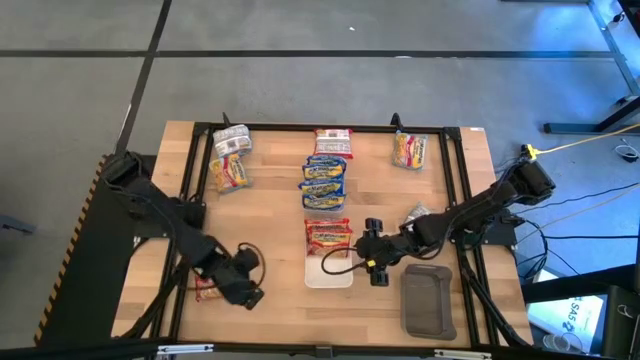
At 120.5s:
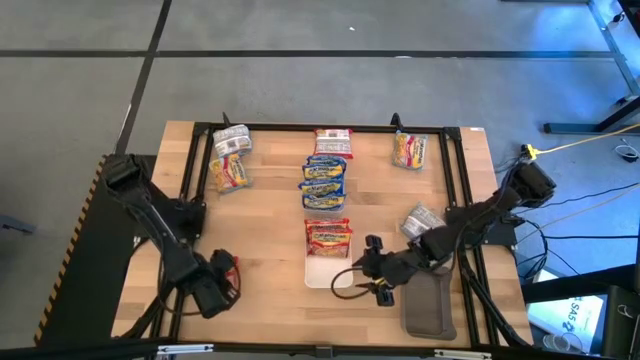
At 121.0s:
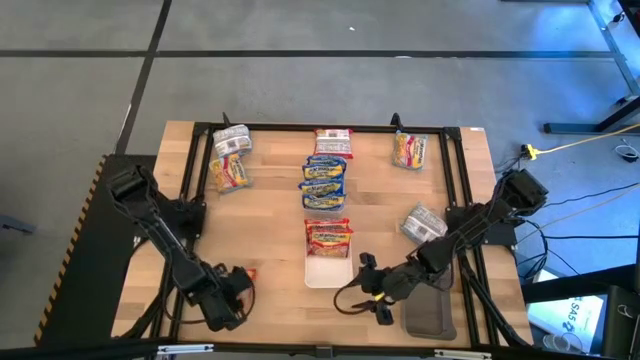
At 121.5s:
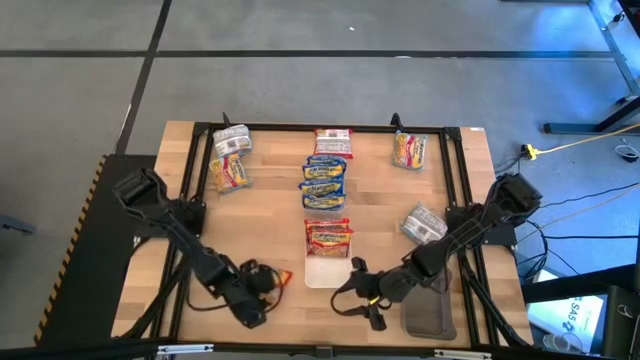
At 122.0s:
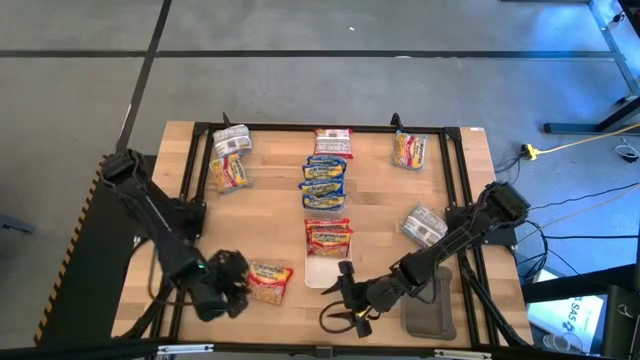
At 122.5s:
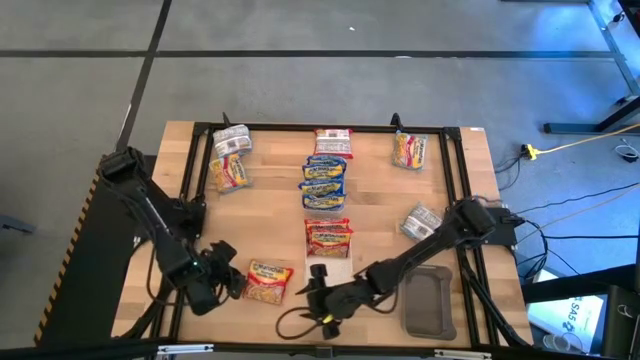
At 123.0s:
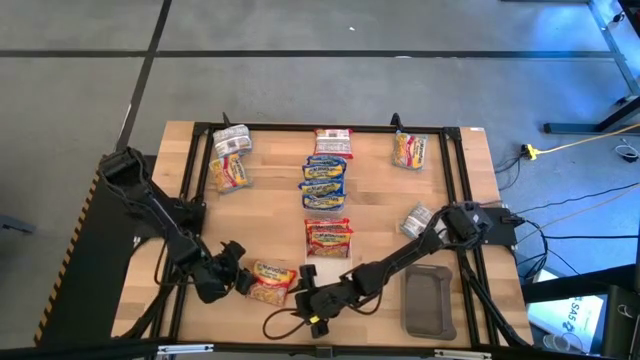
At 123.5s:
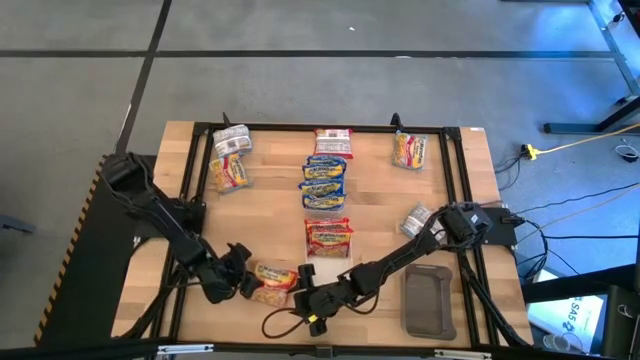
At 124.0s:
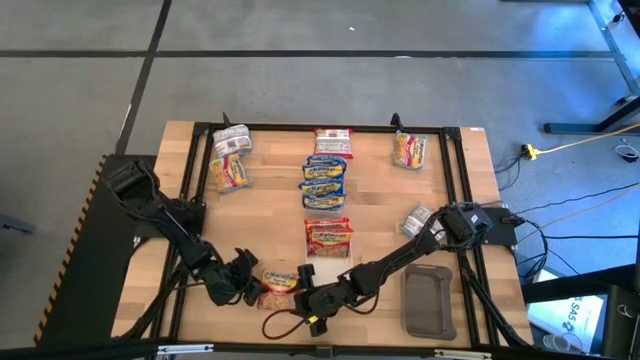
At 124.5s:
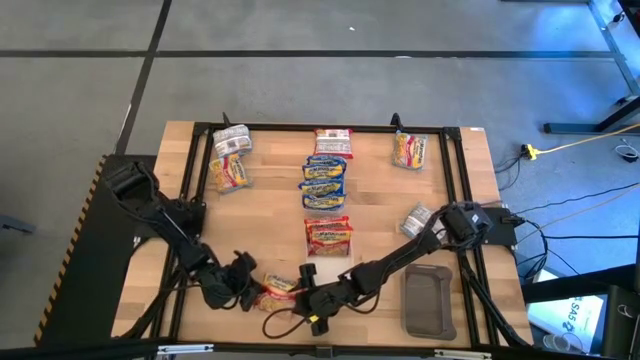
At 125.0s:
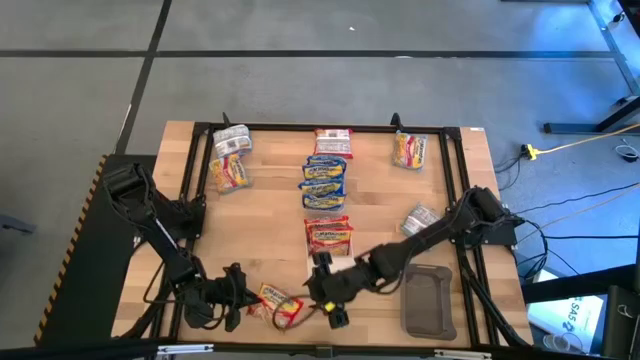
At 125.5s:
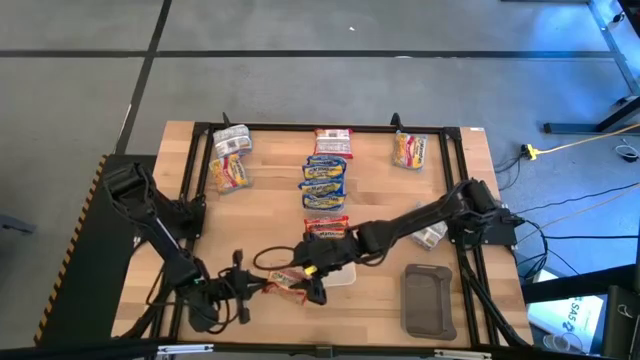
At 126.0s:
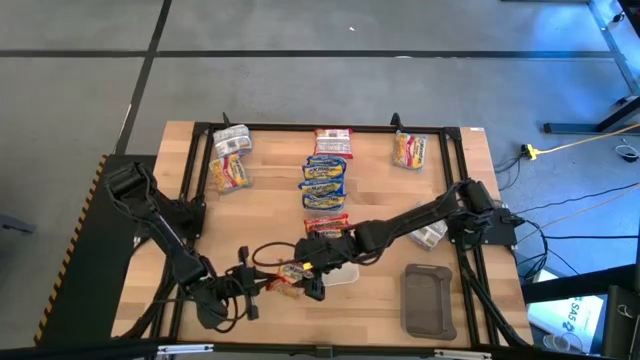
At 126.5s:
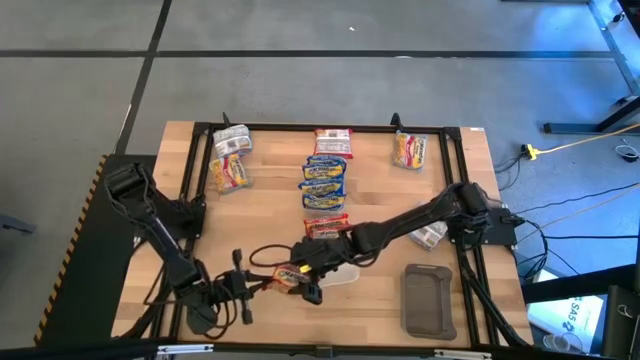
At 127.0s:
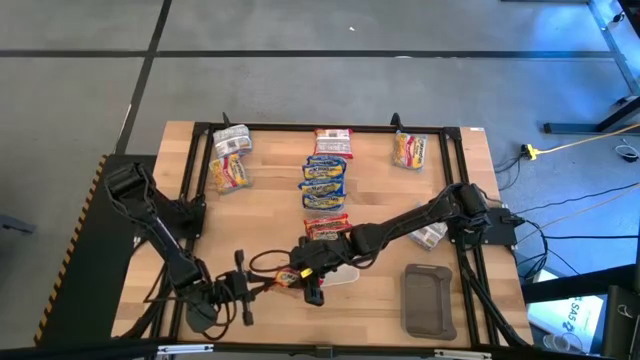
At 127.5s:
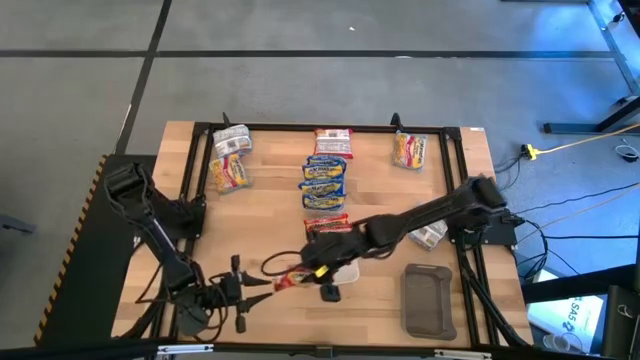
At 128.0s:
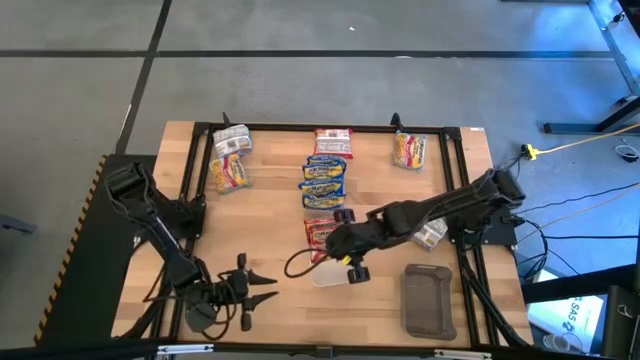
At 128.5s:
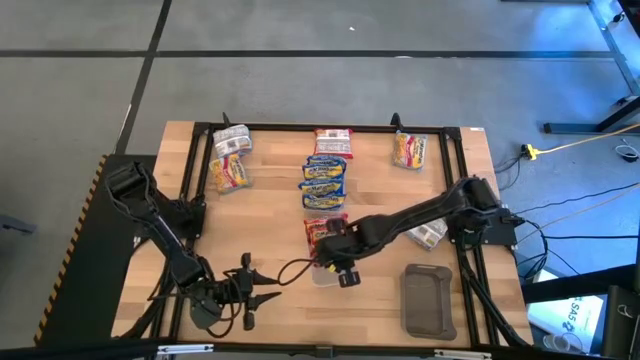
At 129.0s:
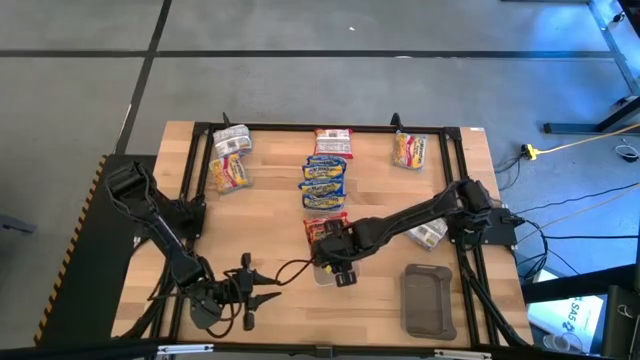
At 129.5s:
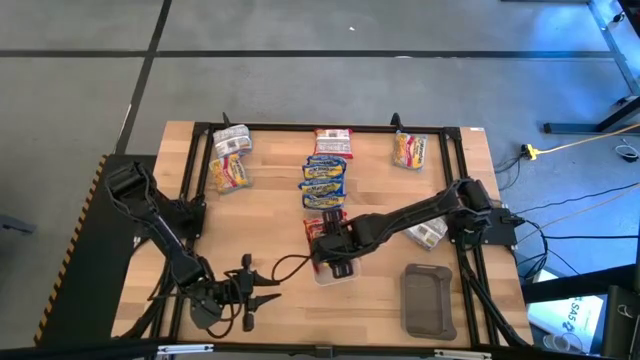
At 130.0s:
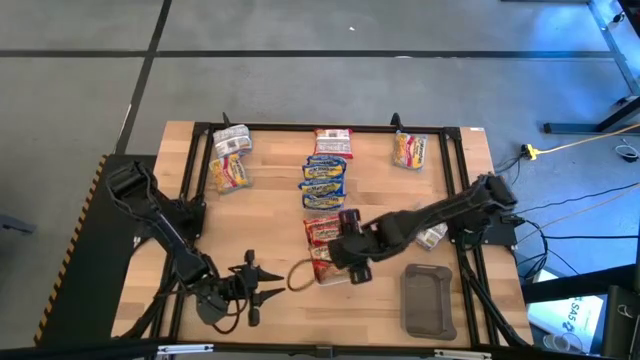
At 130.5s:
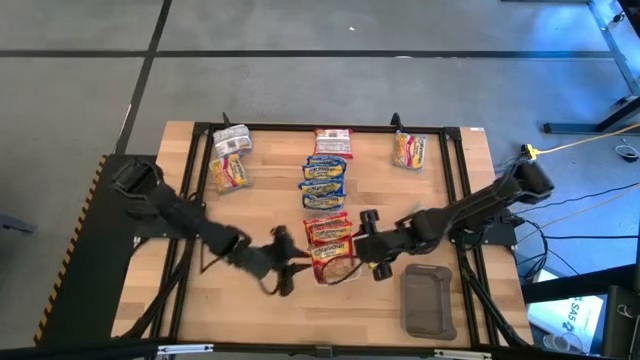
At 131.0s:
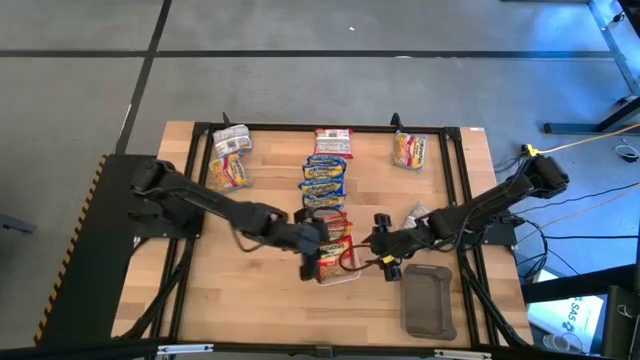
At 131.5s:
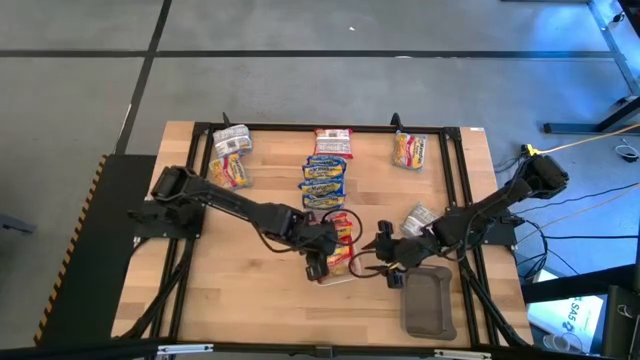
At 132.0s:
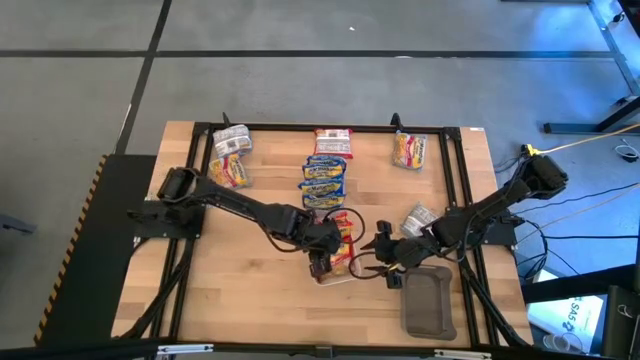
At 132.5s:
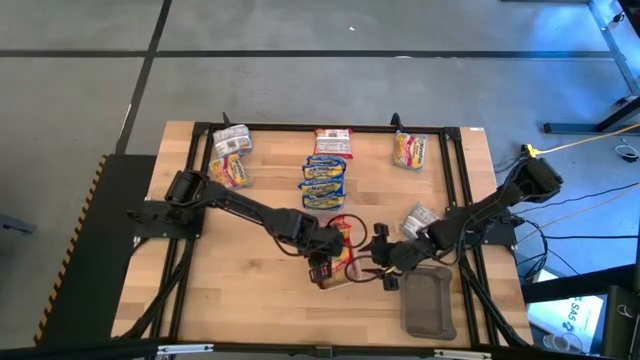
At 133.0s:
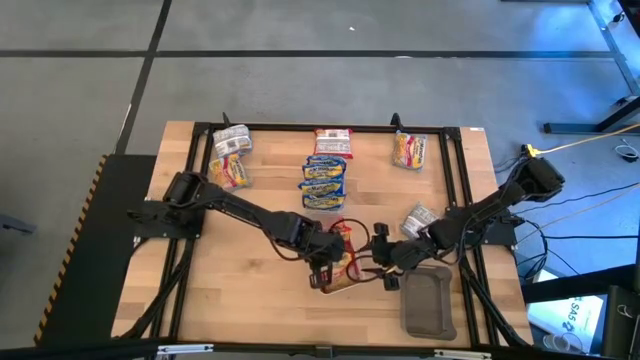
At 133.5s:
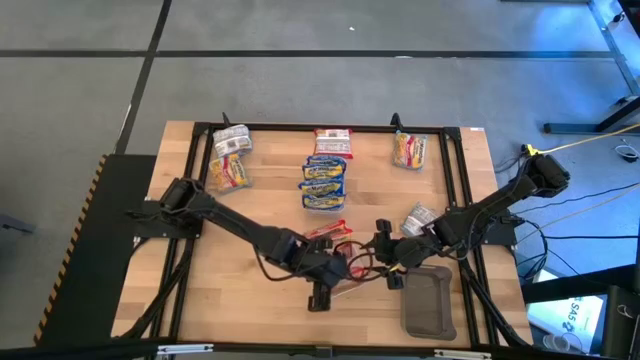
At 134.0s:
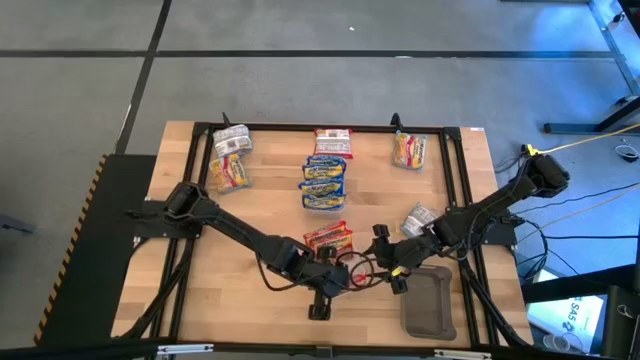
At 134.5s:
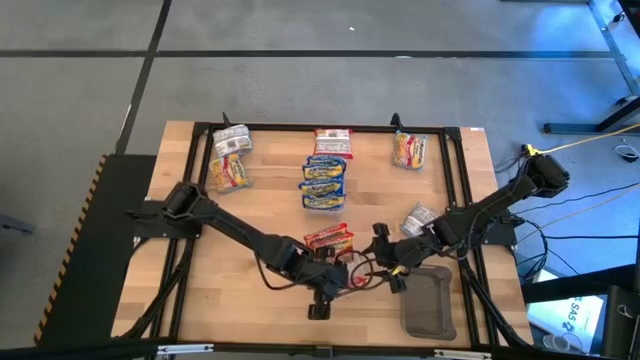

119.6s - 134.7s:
Task: Sort Maruchan noodles
Put the red noodle pack into the white bin

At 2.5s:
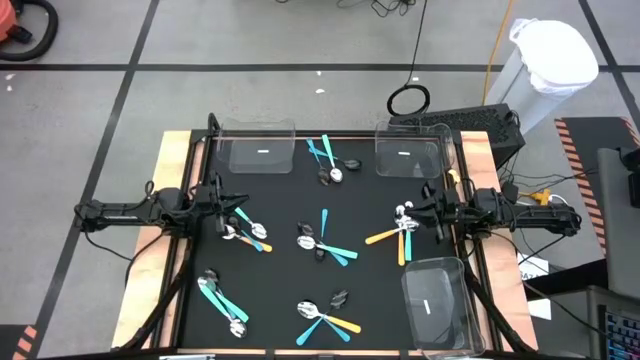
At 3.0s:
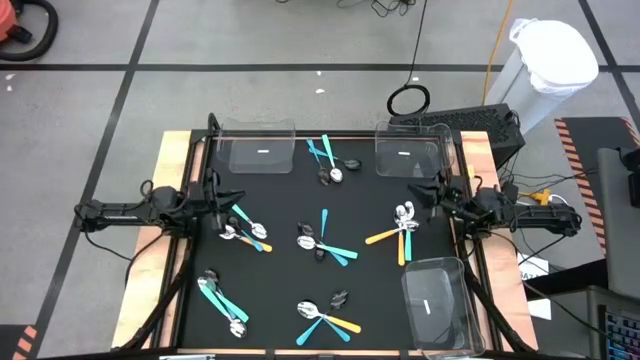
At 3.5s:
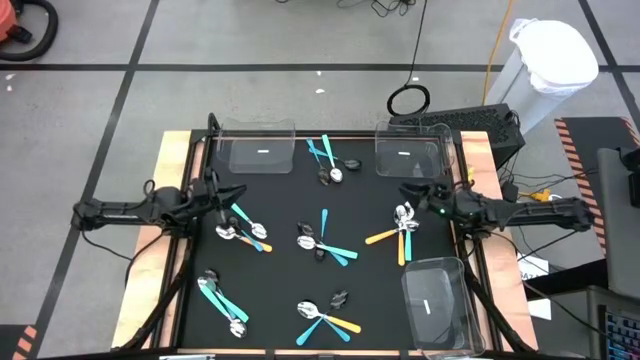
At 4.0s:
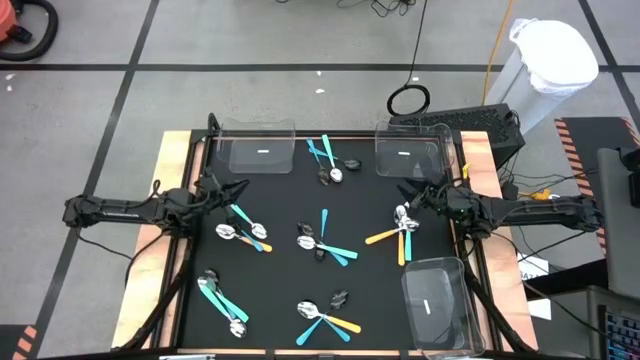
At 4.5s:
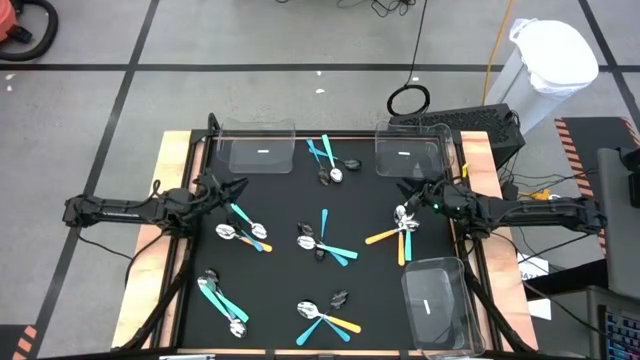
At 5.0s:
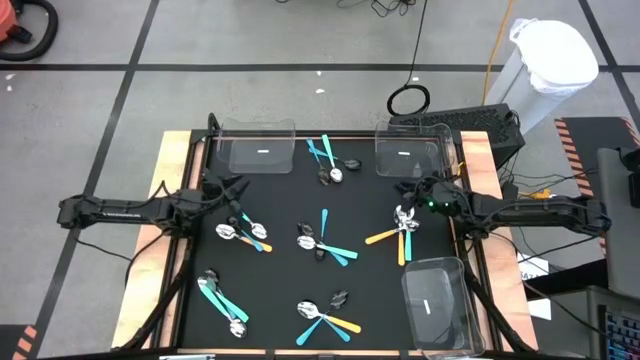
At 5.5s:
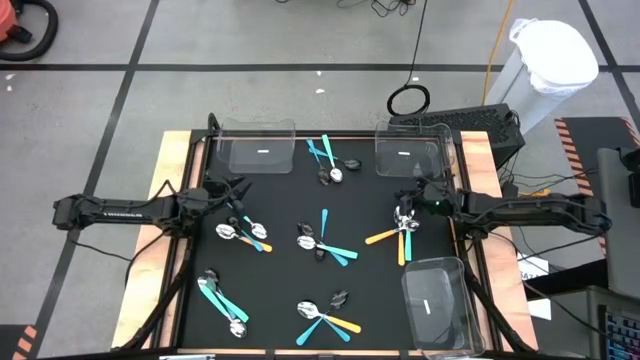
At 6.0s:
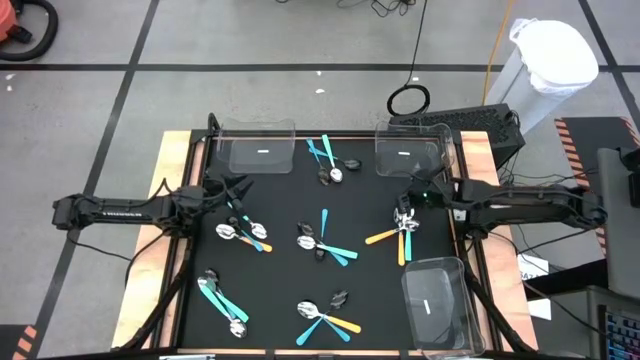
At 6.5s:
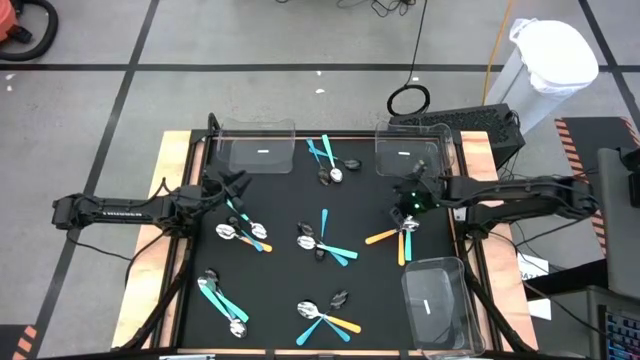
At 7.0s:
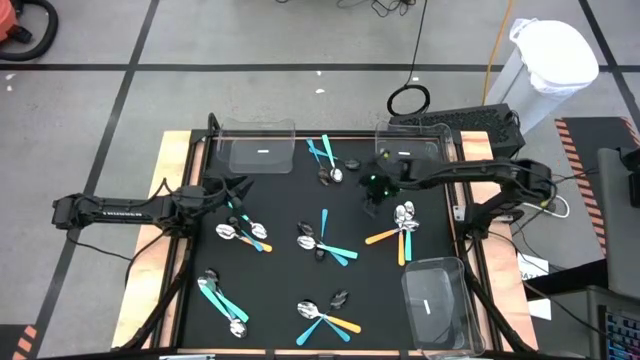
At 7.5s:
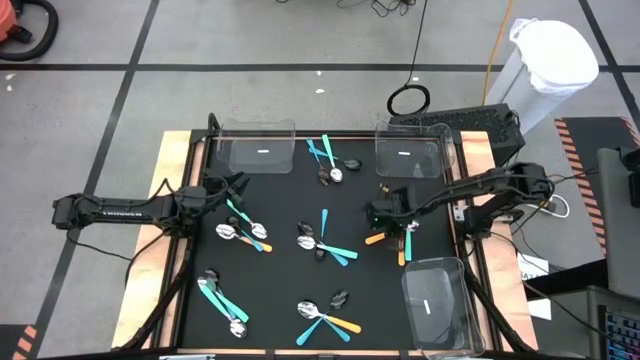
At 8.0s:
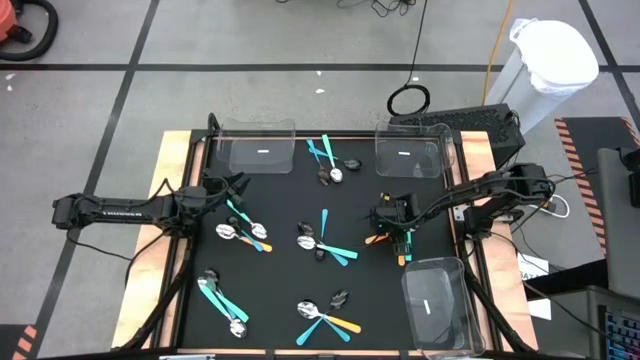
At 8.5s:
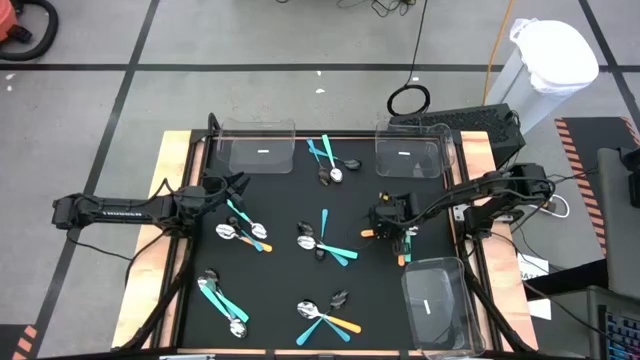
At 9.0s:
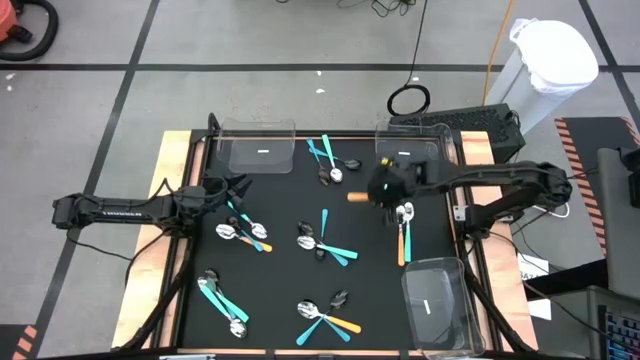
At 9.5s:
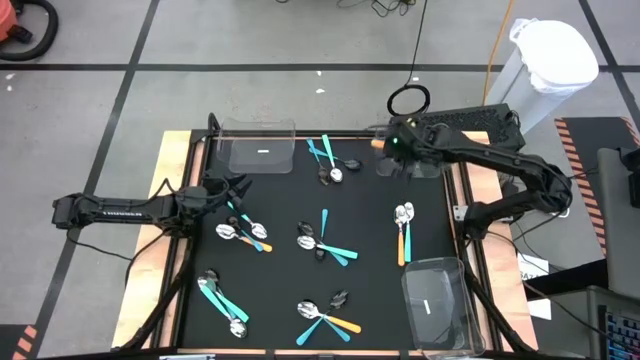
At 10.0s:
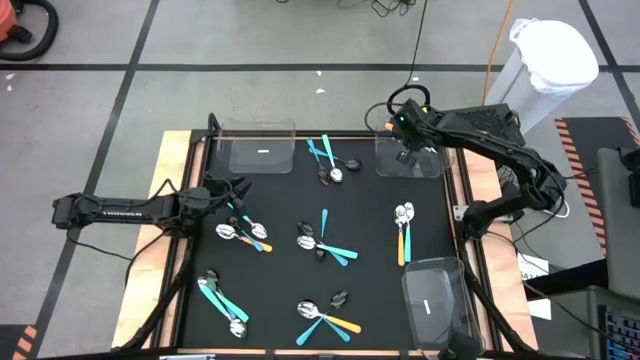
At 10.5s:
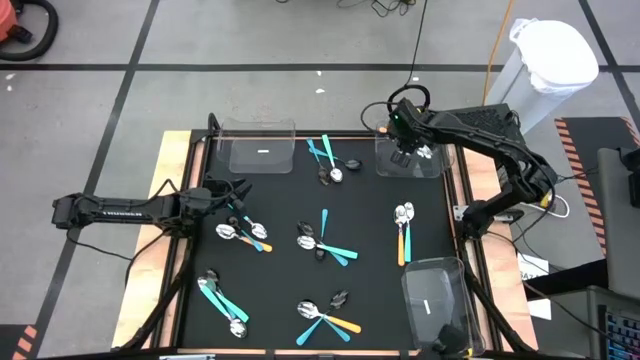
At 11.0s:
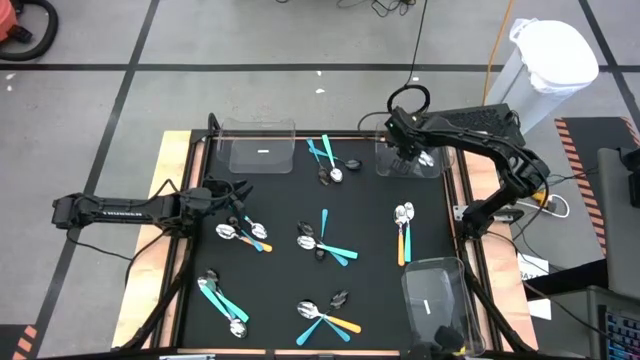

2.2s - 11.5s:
Task: Sort silverware by color (type)
Put the yellow spoon into the top right transparent bin
